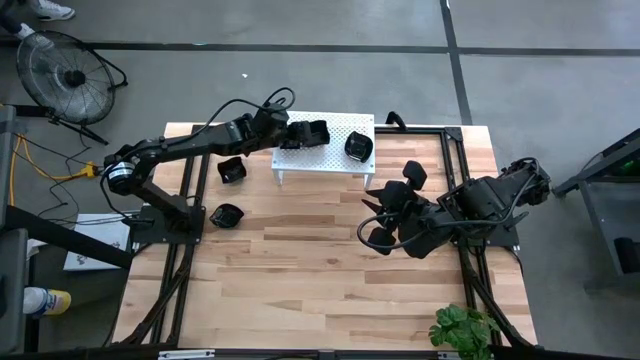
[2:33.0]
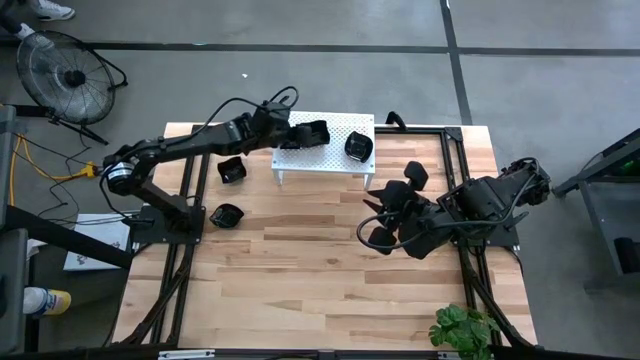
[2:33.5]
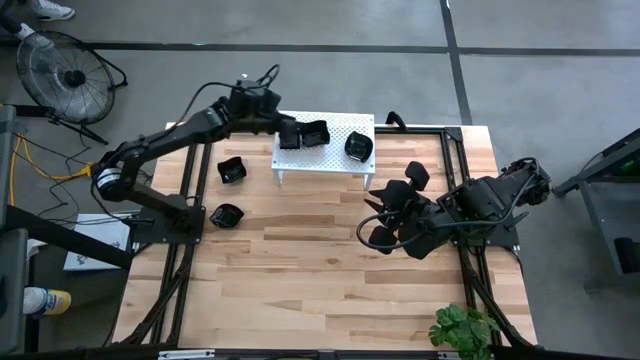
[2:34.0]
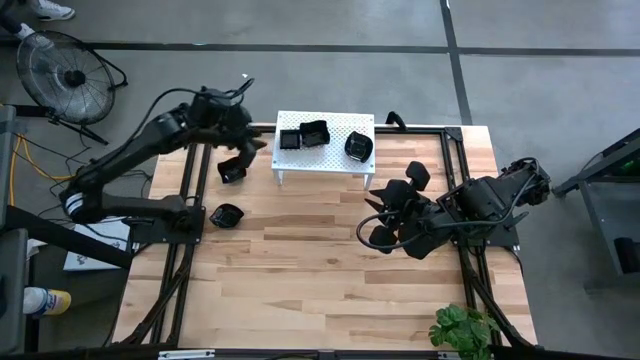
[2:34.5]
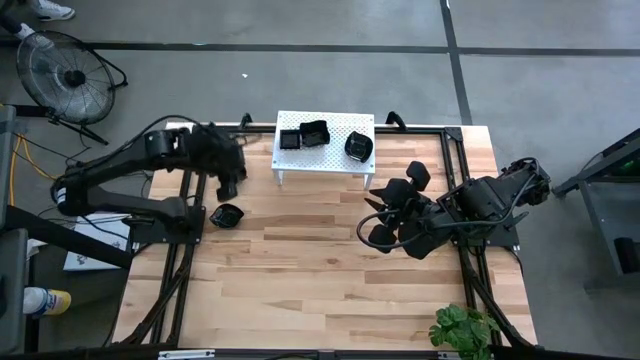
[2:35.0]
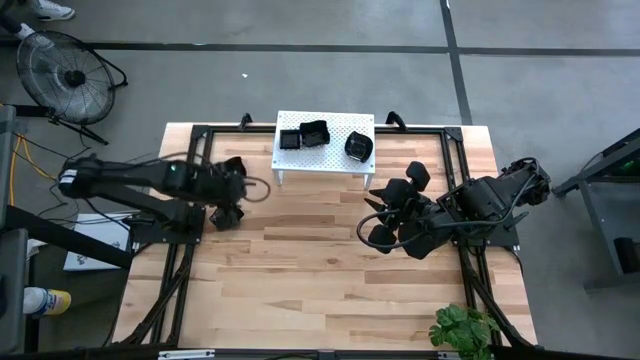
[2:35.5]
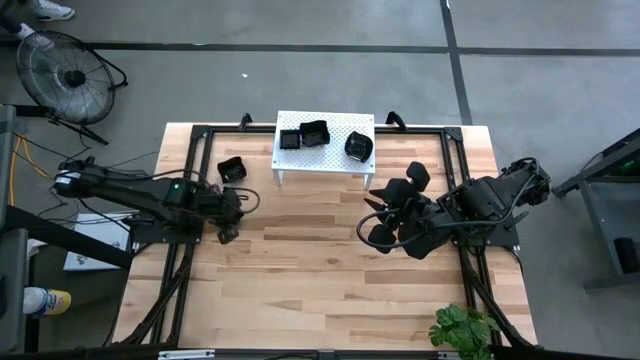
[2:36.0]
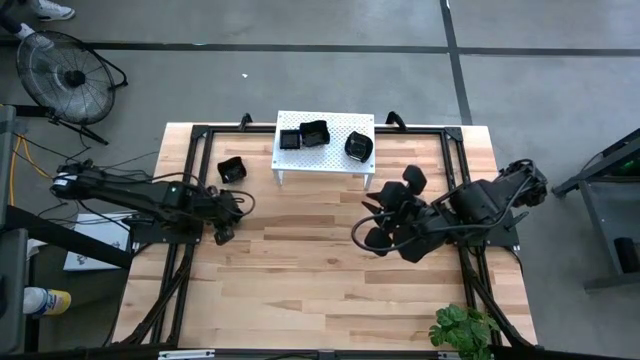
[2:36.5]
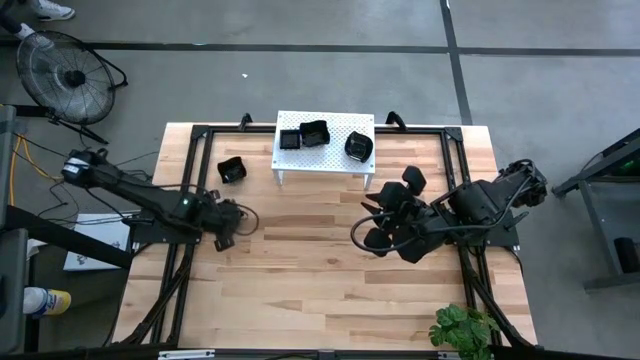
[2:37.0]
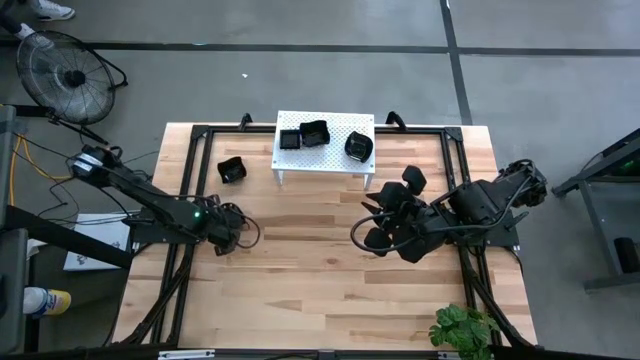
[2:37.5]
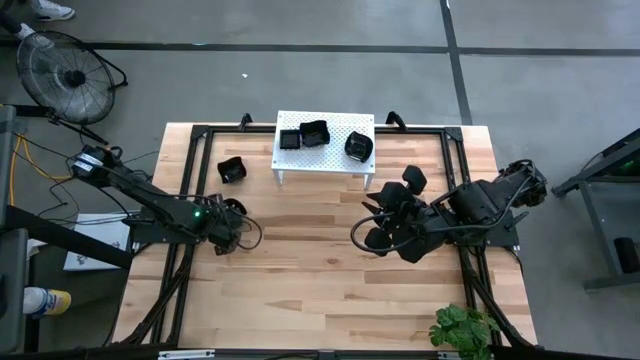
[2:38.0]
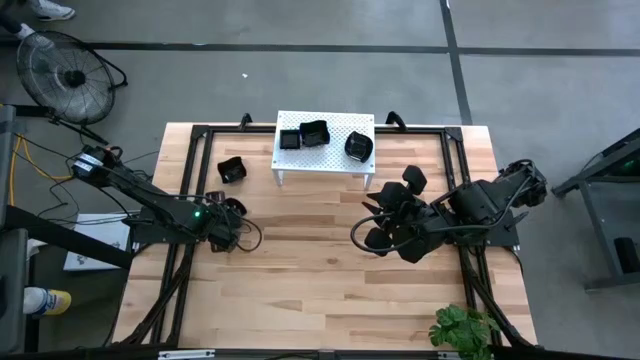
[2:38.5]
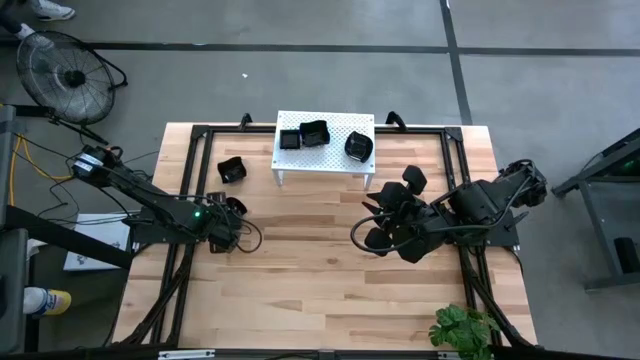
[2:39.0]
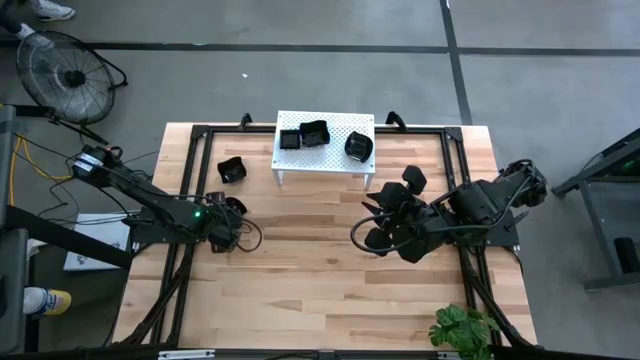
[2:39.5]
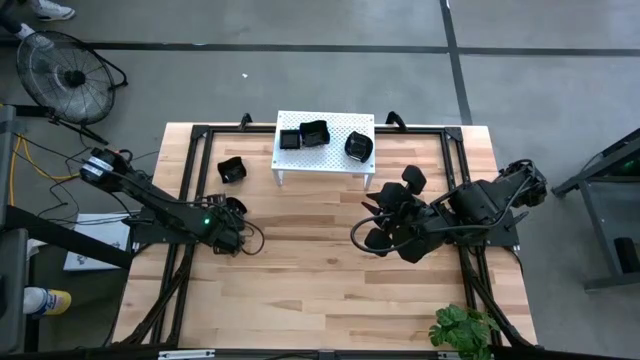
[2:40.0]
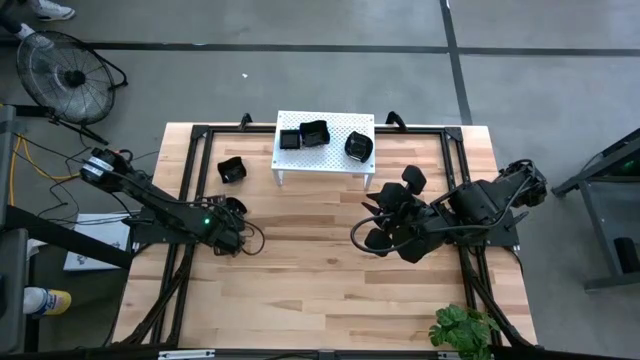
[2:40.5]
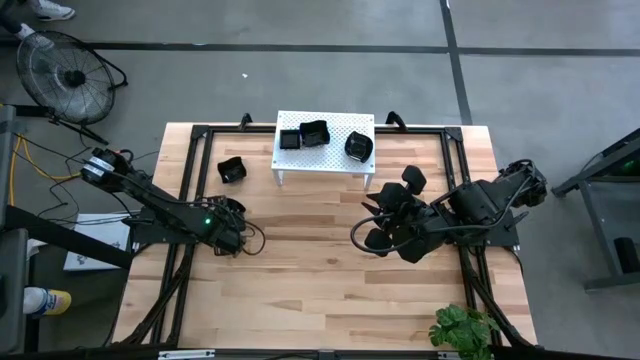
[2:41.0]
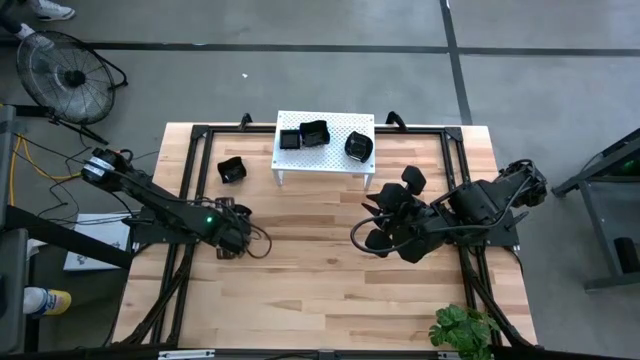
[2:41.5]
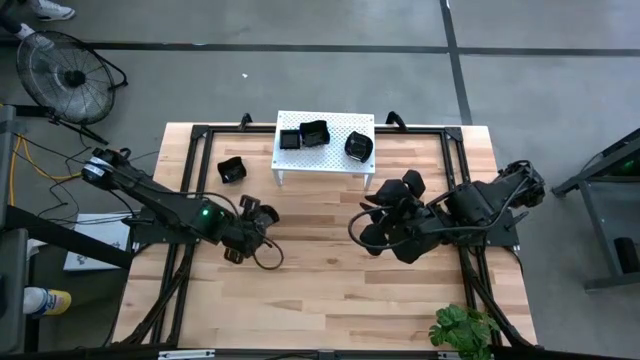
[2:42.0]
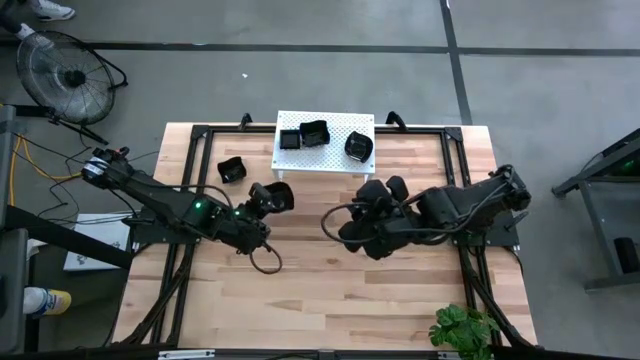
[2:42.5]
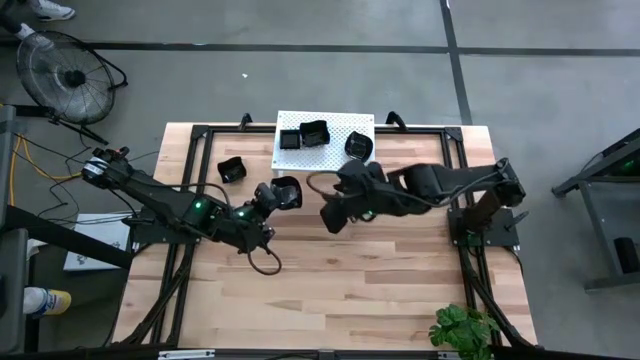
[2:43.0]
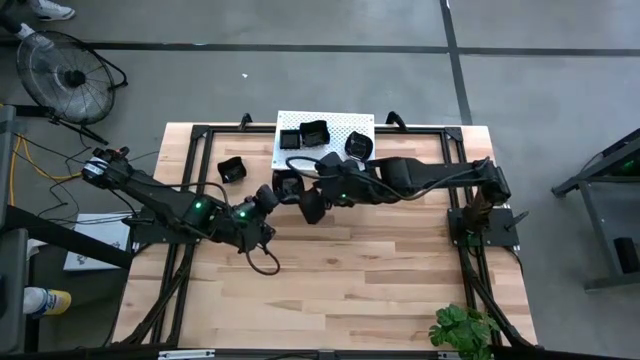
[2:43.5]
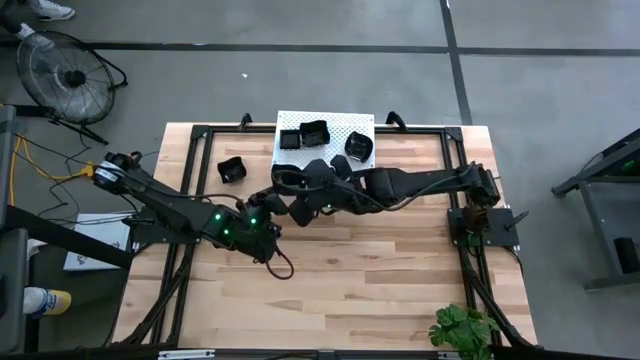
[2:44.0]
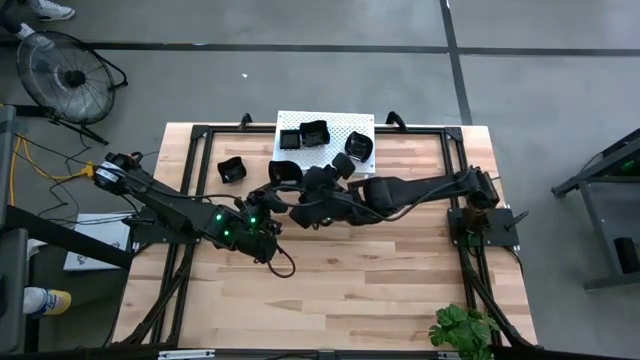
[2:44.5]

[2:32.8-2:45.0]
Task: Pick & Place Mini shaped plates
Stack the leaf shaped plate on top of the other leaf shaped plates on the shelf

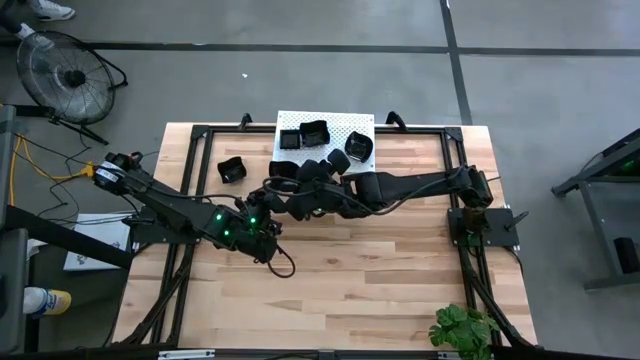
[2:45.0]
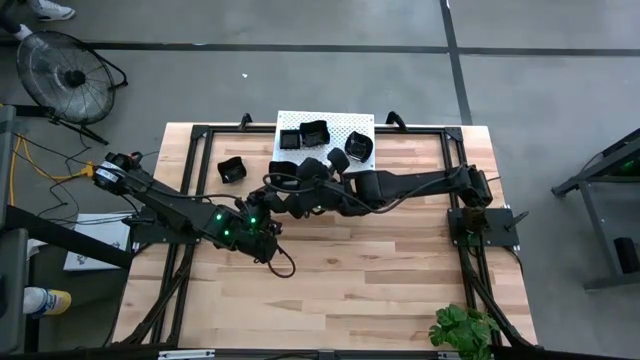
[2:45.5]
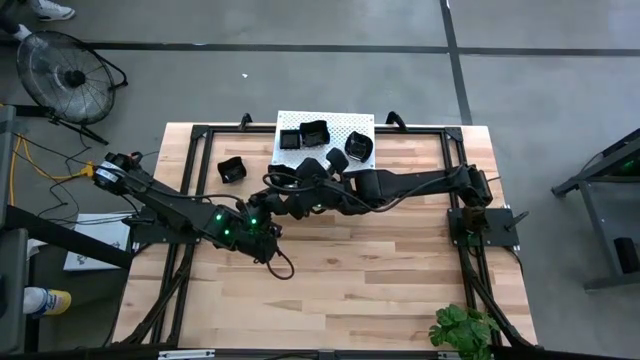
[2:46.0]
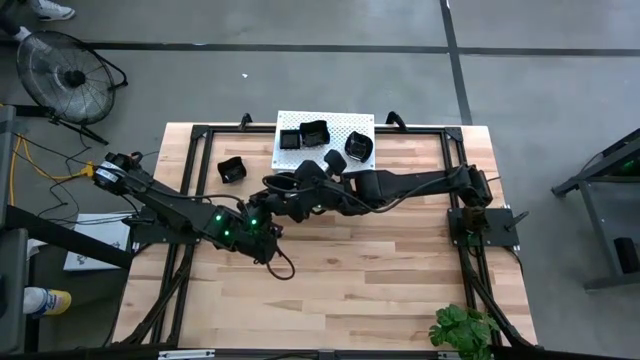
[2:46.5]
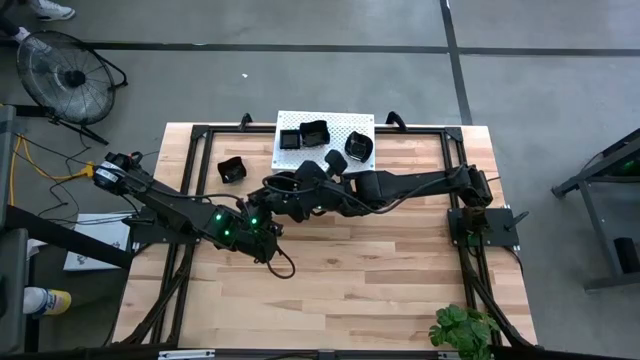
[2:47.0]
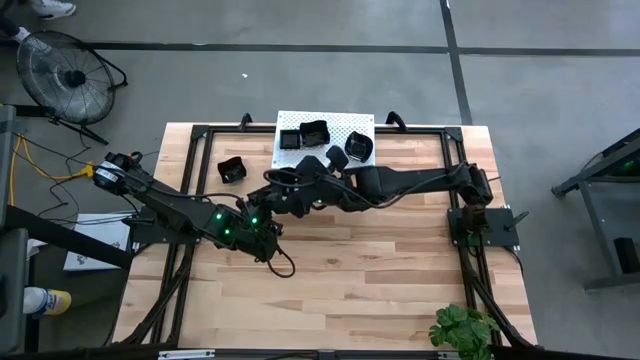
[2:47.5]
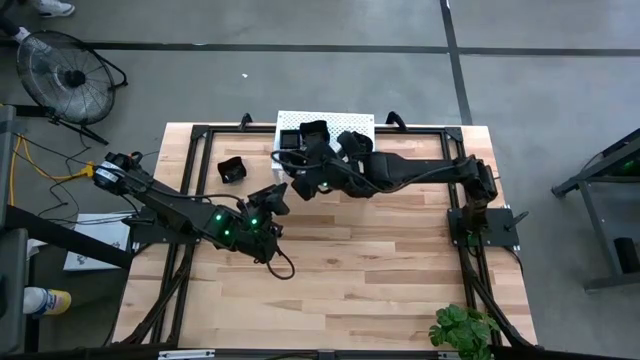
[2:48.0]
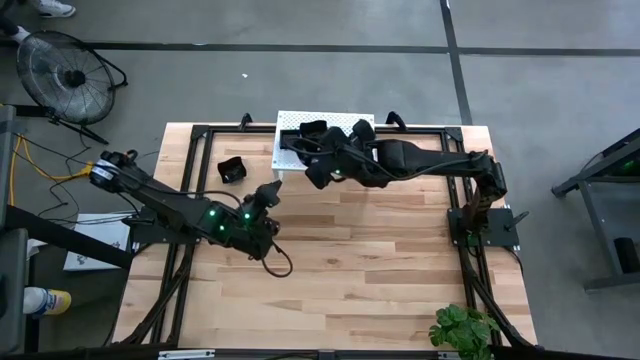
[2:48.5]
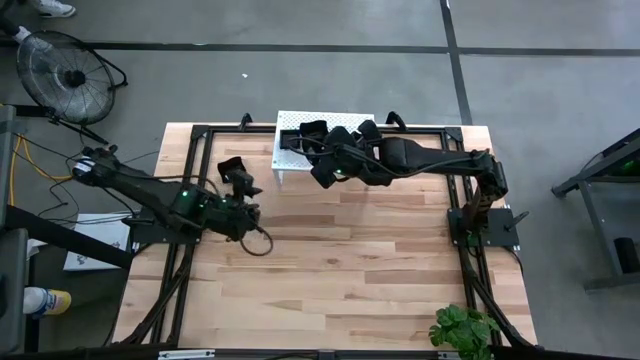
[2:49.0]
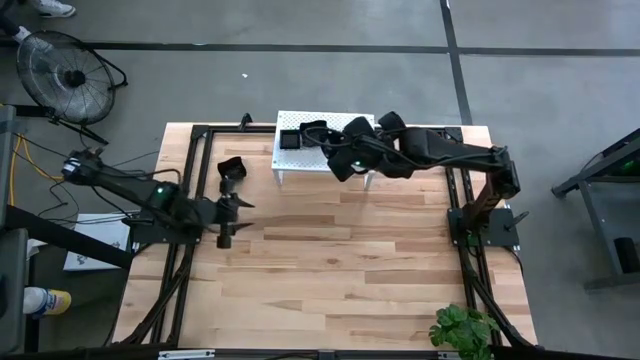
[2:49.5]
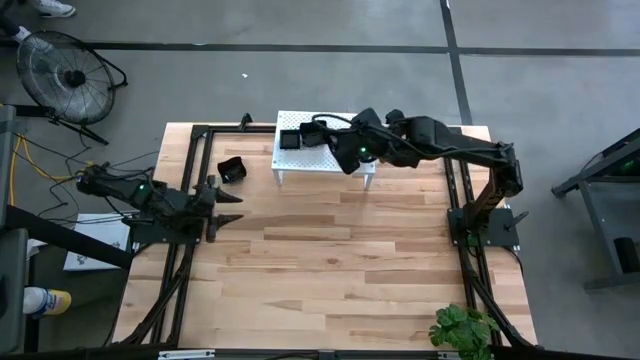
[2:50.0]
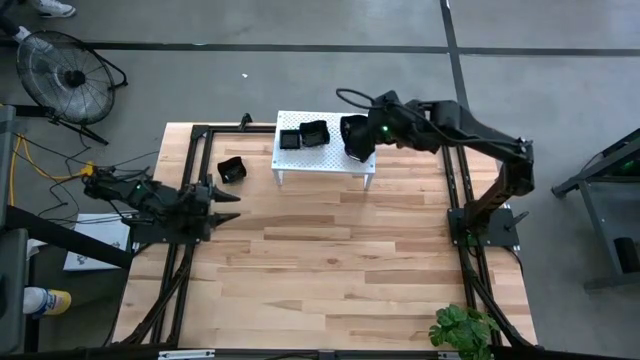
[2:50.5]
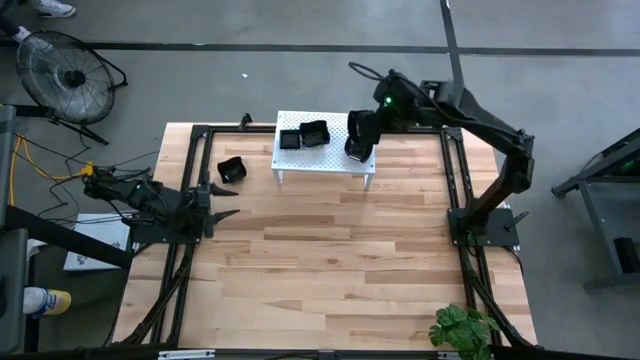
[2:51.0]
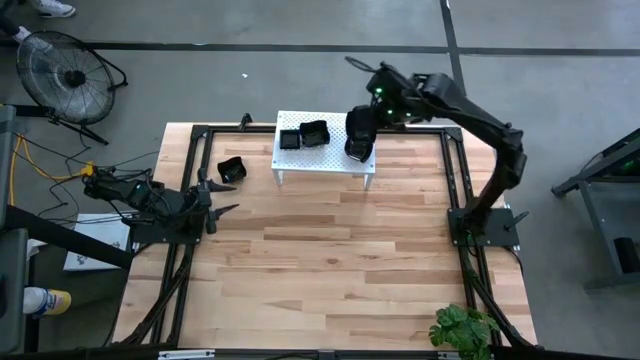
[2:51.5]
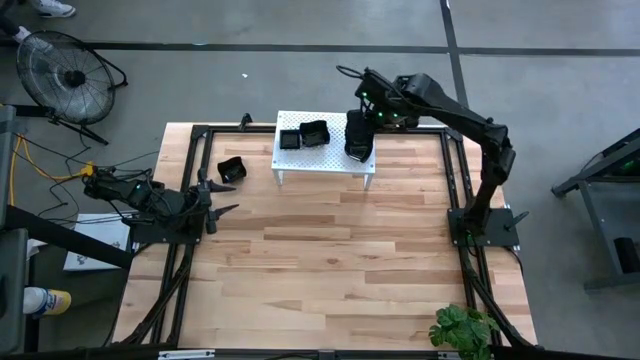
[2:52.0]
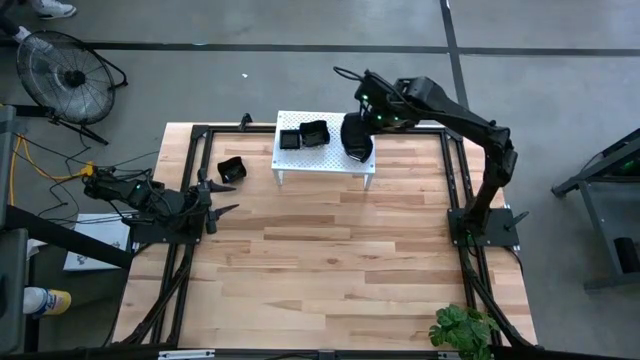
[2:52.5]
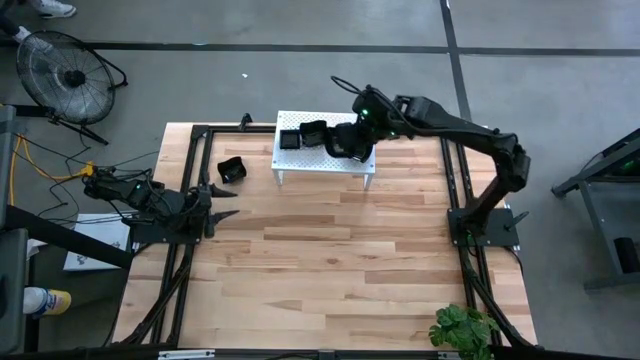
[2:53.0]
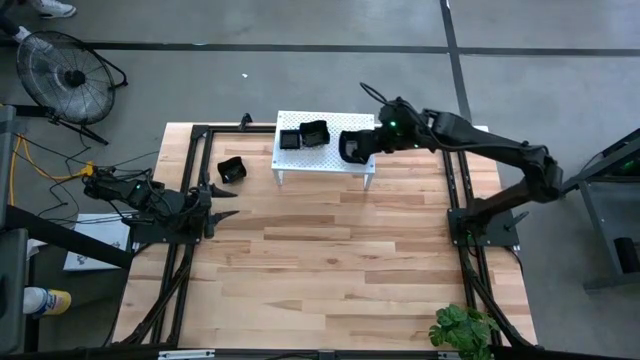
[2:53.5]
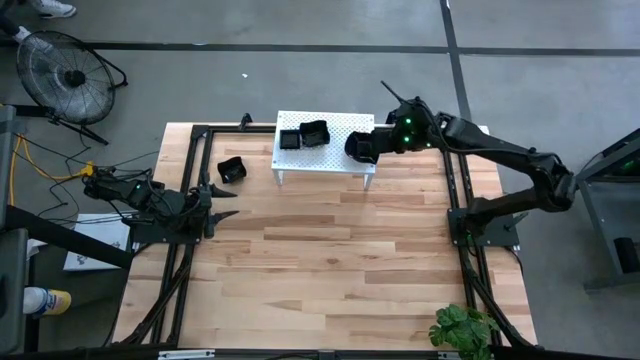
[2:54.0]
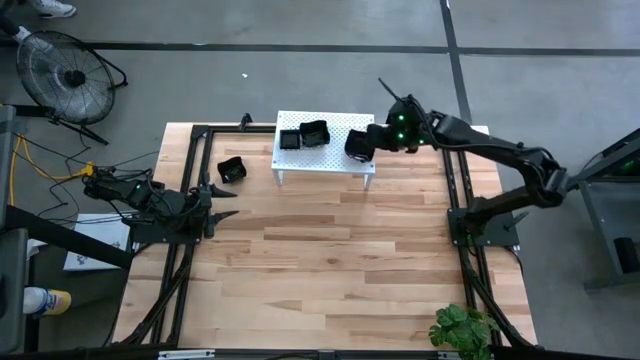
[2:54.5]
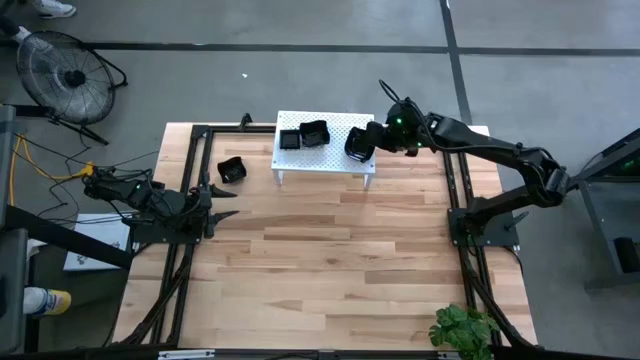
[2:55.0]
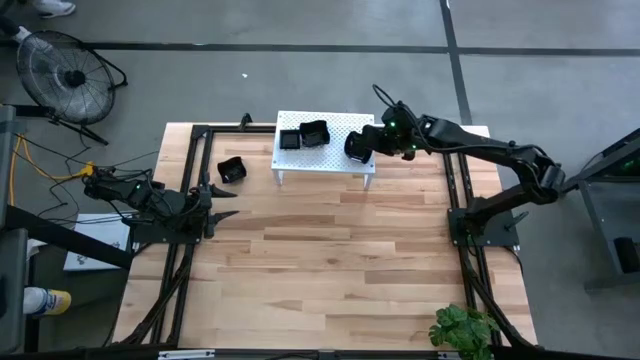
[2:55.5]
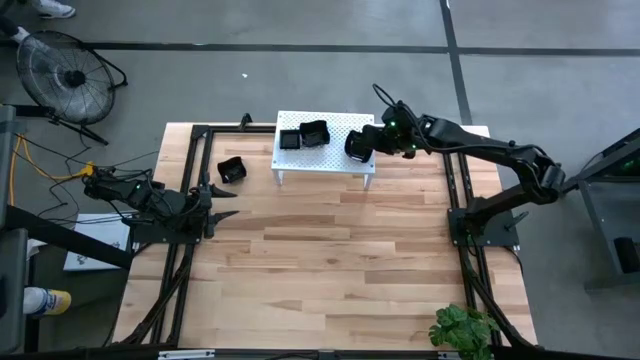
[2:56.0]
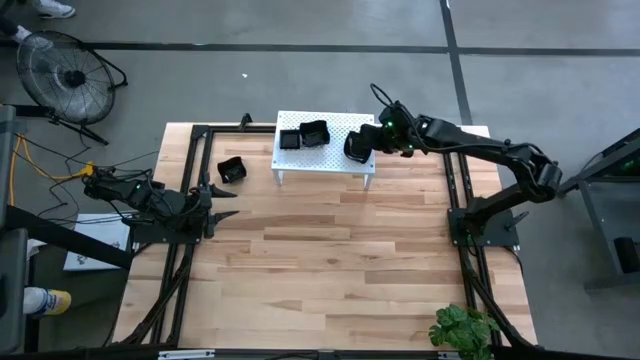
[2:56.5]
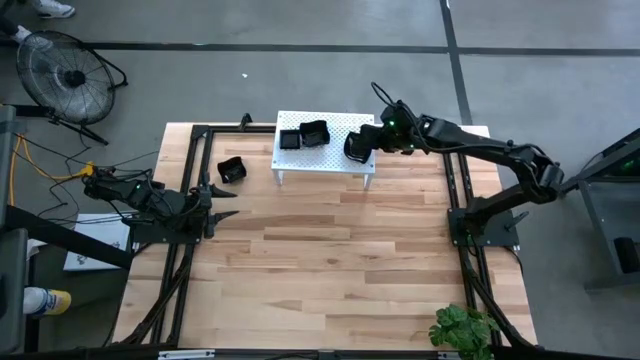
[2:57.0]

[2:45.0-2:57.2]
Stack the leaf shaped plate on top of the other leaf shaped plates on the shelf
